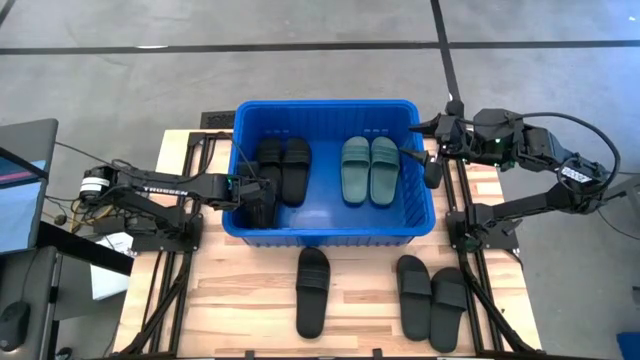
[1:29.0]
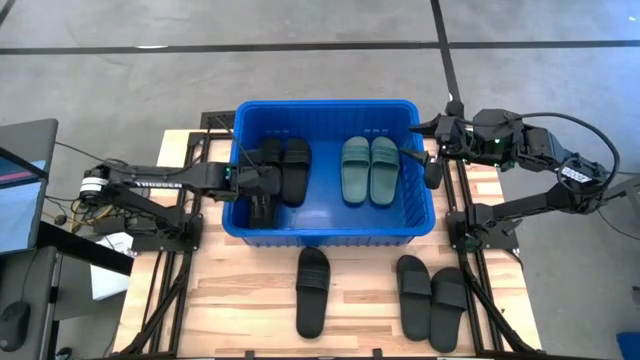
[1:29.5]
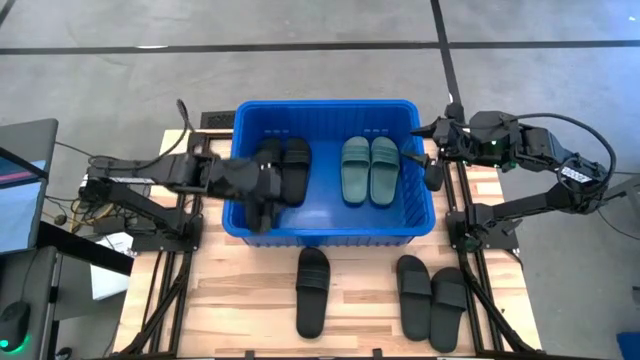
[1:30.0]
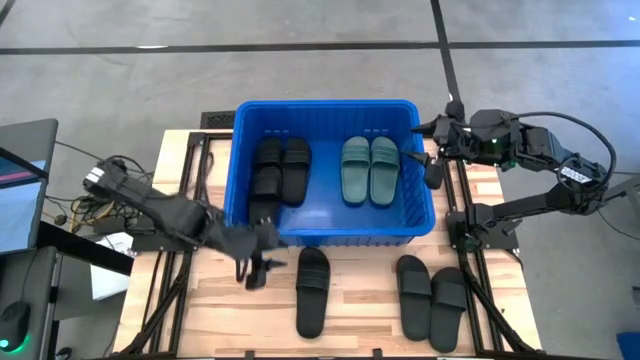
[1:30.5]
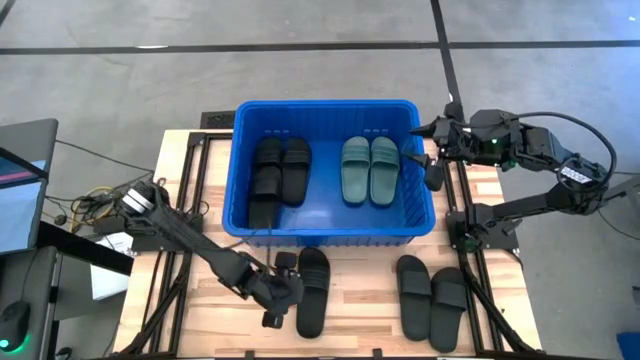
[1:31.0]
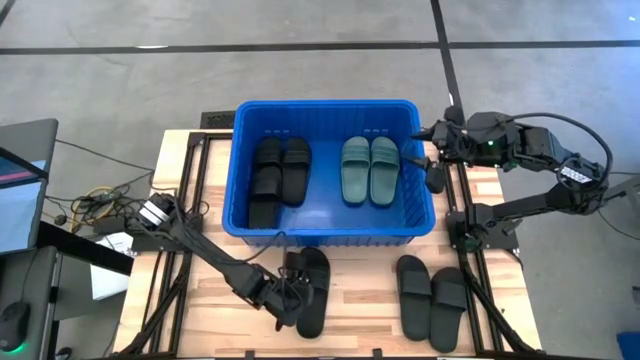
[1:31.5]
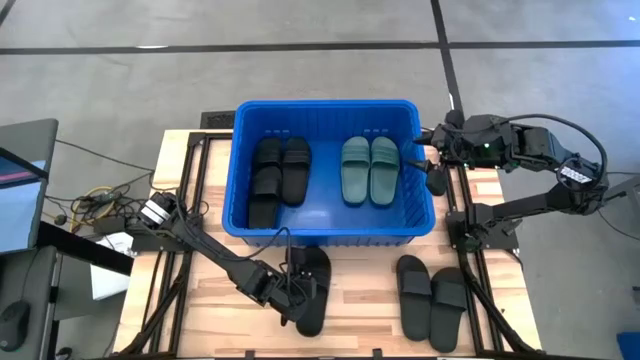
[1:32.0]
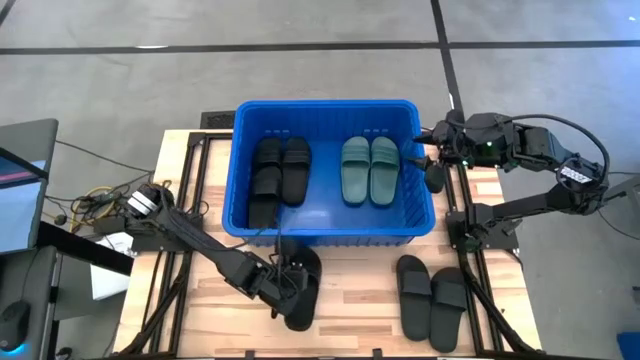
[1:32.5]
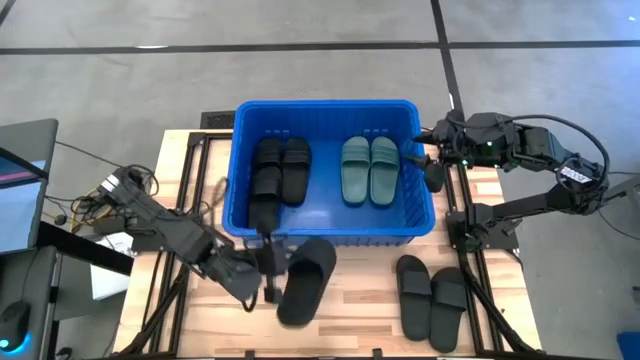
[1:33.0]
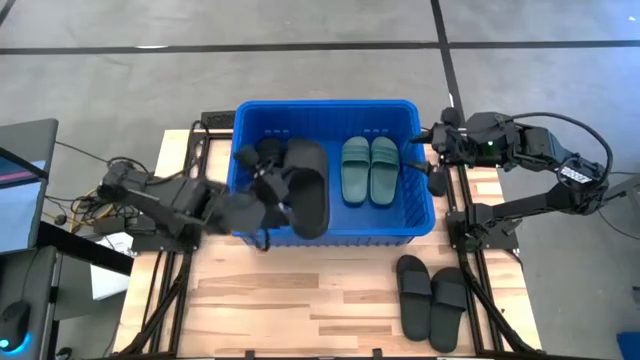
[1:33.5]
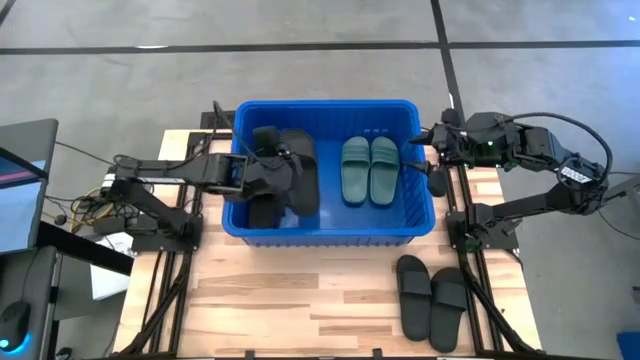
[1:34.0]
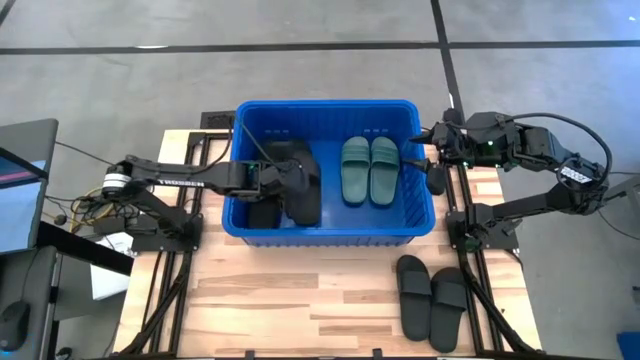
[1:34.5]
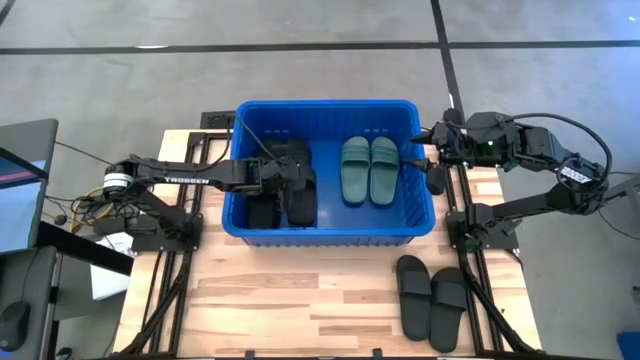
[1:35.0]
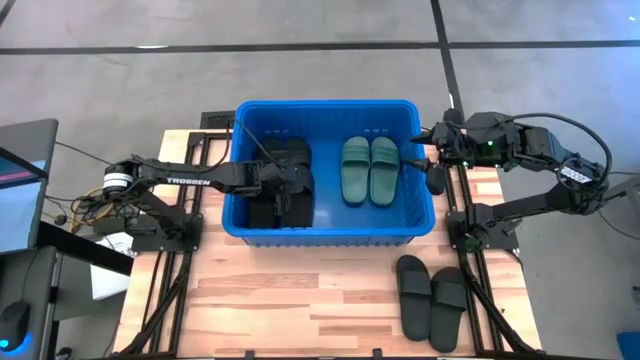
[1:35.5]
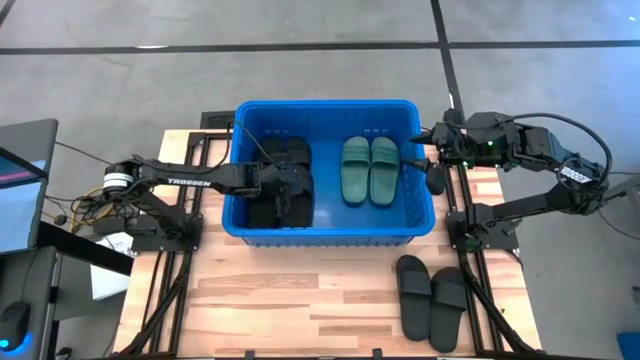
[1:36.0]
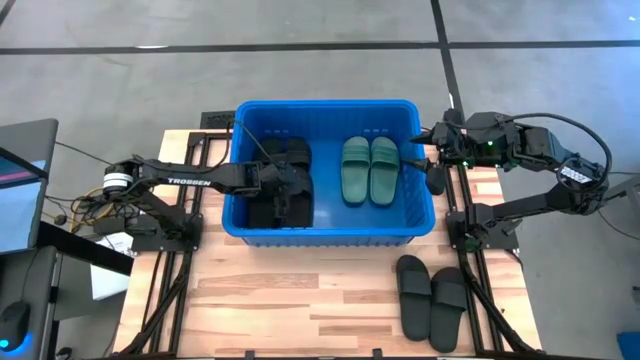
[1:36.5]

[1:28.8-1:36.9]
Task: Pick and place slides into bin
Put the left black slide into the blue bin

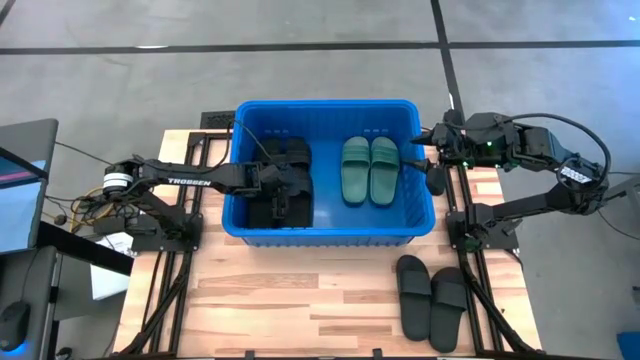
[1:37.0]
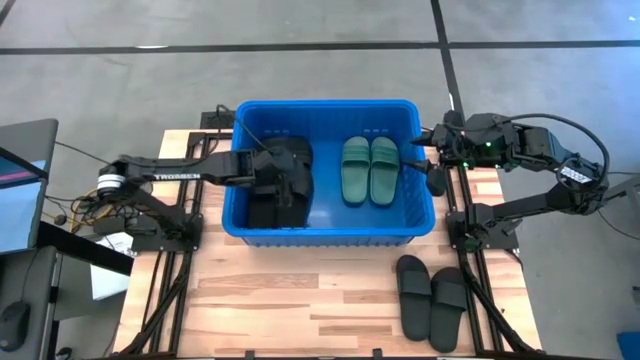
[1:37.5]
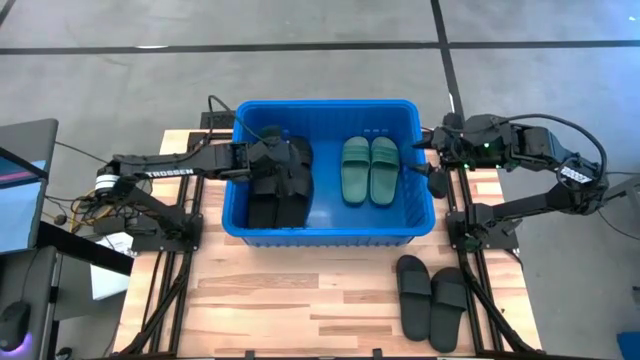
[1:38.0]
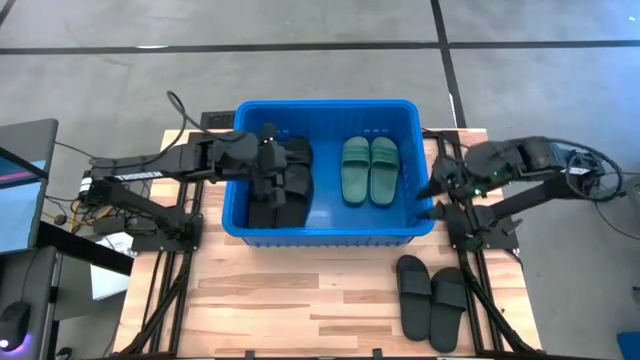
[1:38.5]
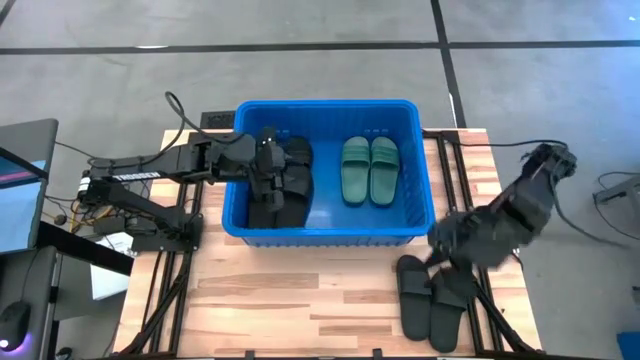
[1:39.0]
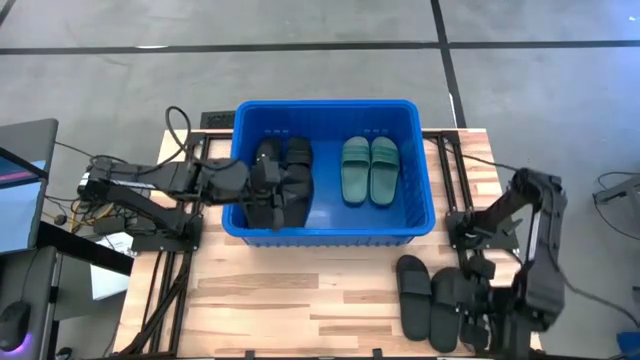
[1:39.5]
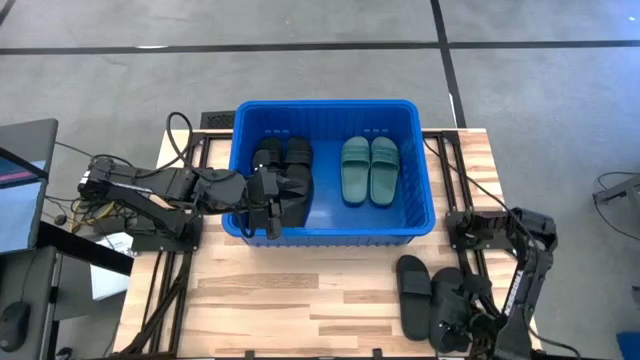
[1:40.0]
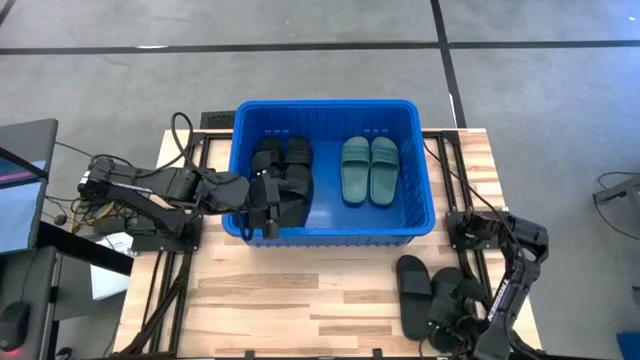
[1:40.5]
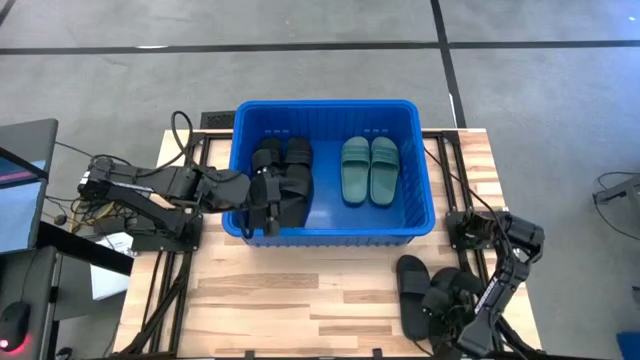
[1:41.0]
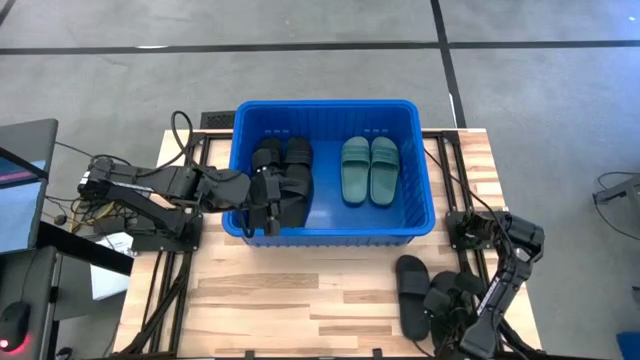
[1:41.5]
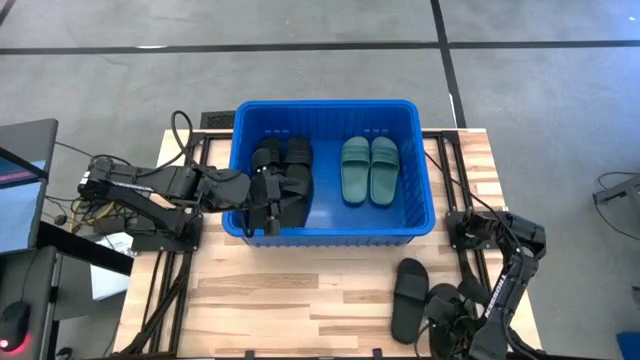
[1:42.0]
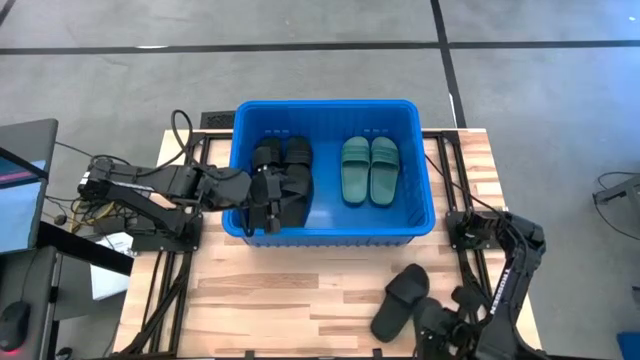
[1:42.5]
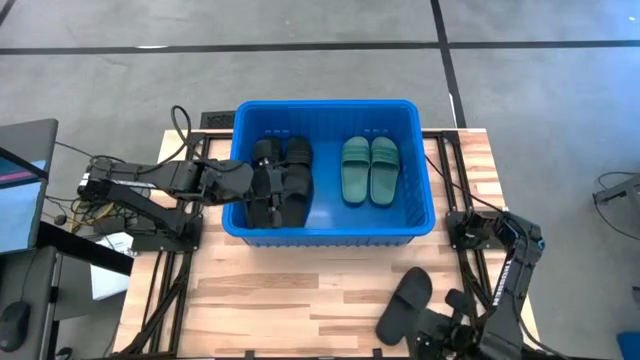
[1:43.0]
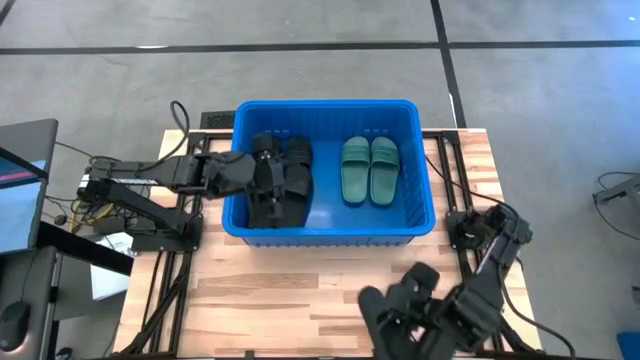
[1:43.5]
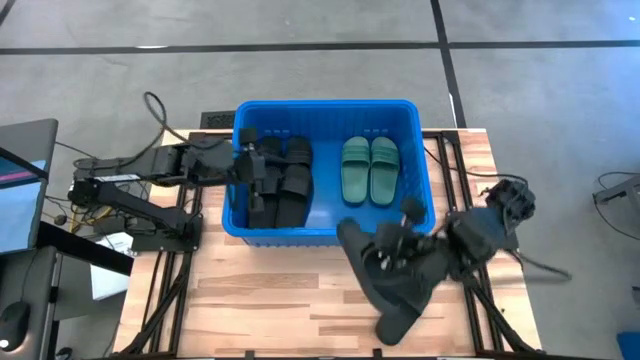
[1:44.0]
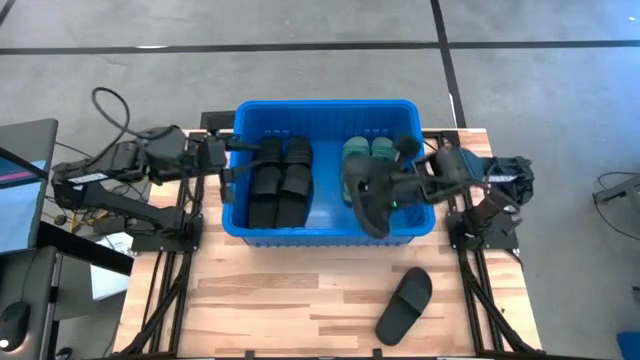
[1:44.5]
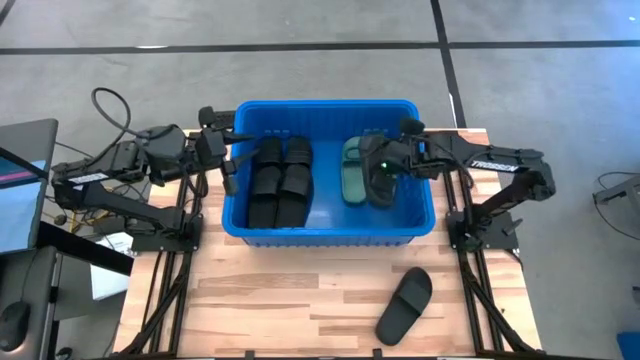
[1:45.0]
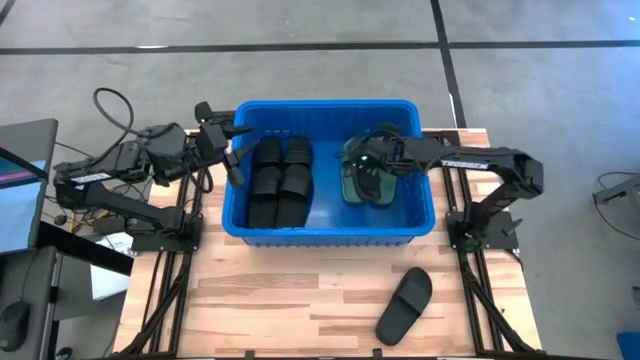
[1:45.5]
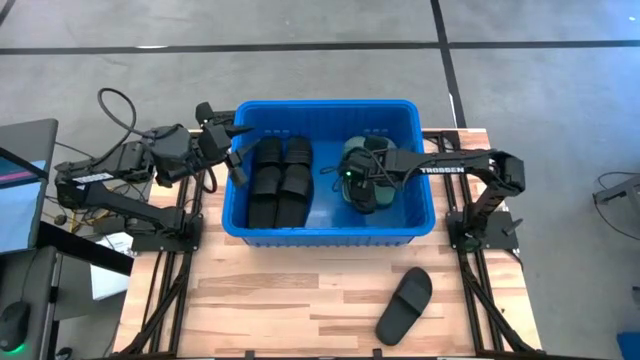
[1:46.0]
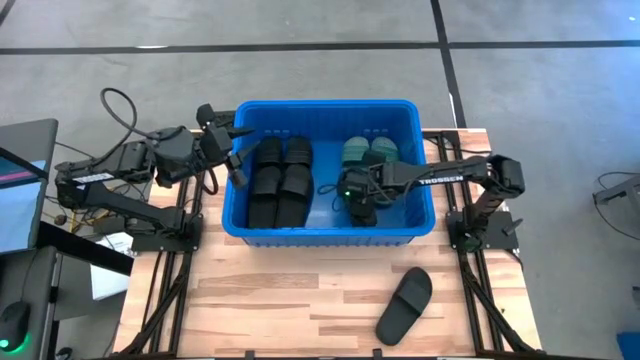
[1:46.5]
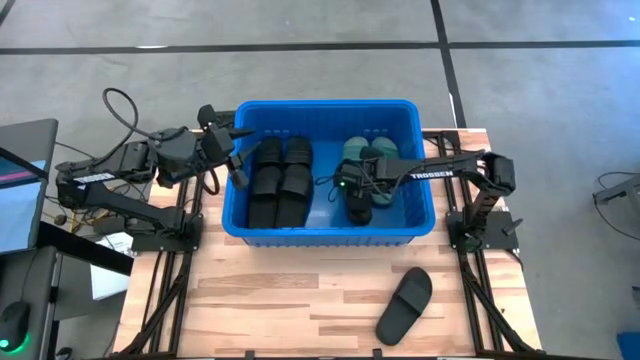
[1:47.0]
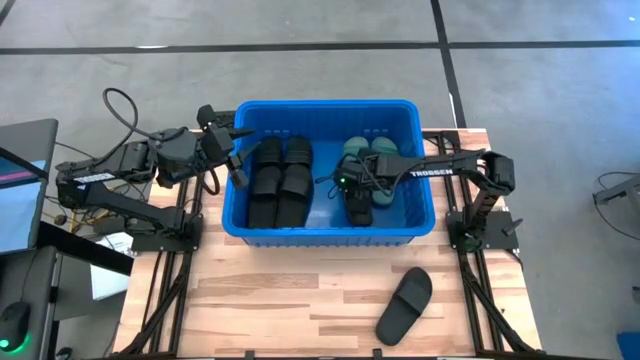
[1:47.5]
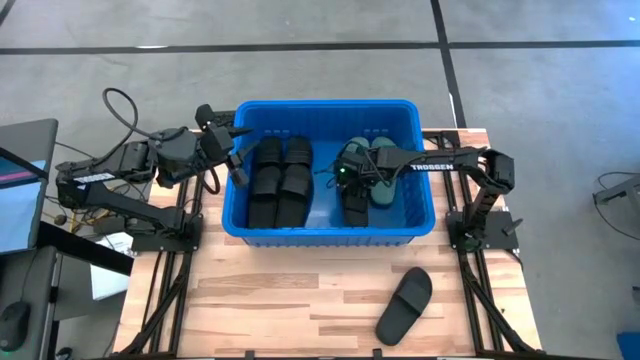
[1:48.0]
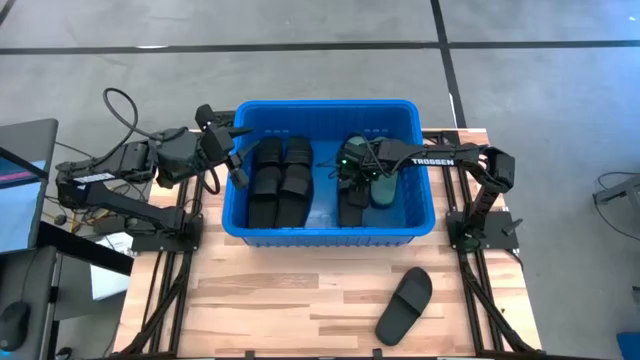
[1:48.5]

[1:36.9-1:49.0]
Put the right black slide into the blue bin

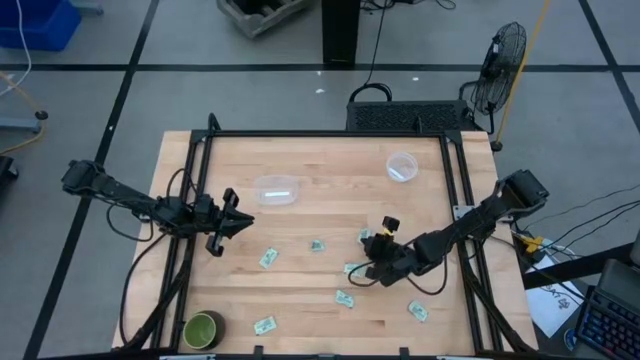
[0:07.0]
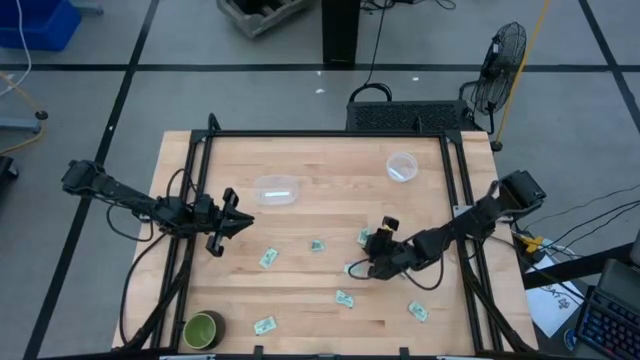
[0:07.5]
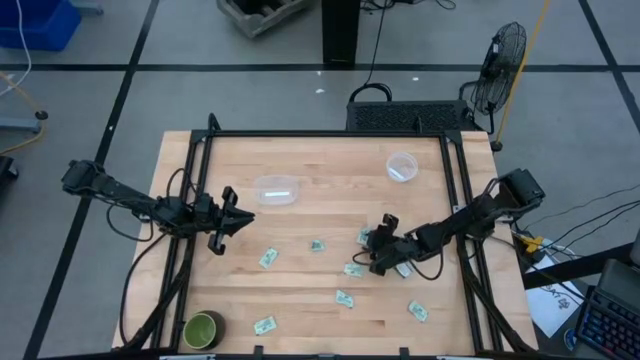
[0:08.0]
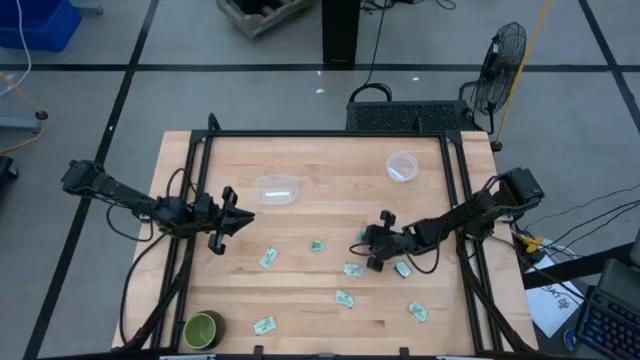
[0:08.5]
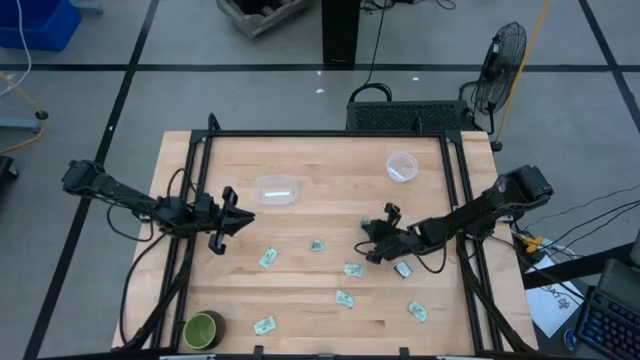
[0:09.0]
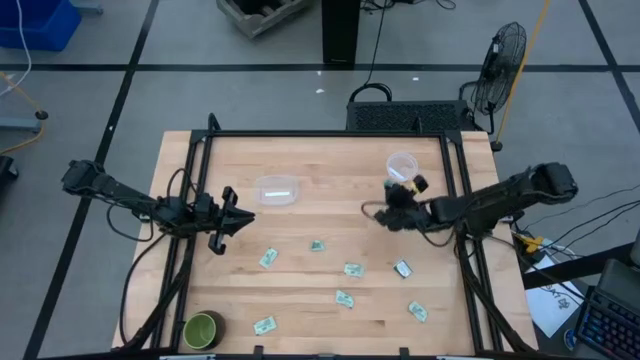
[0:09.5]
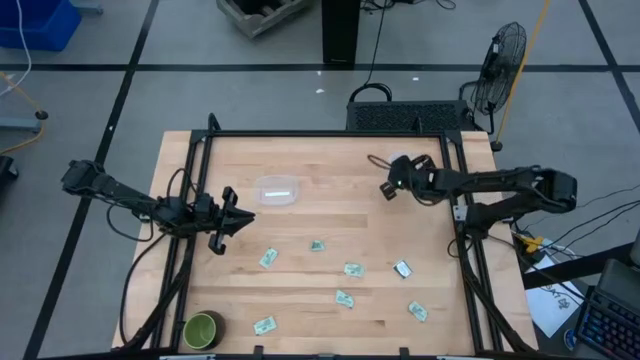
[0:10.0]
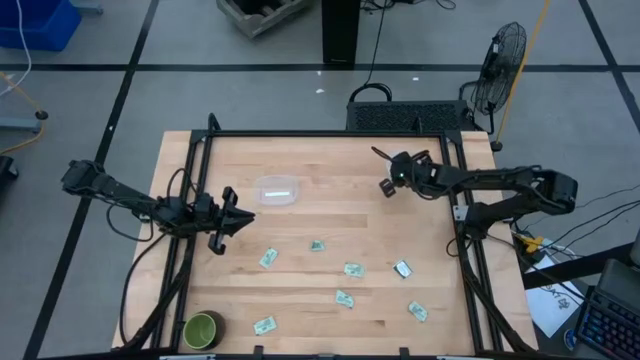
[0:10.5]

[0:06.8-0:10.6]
Task: Pick and place items into bin
Put the stevia packet into the right transparent bin
